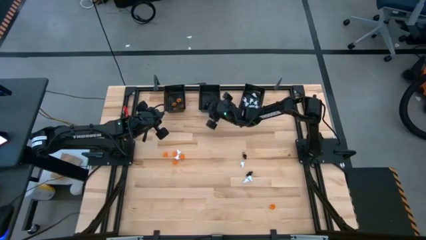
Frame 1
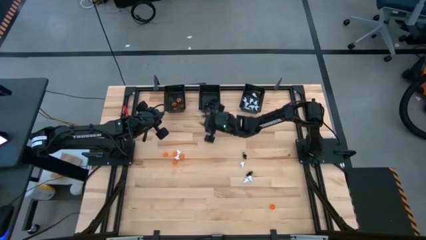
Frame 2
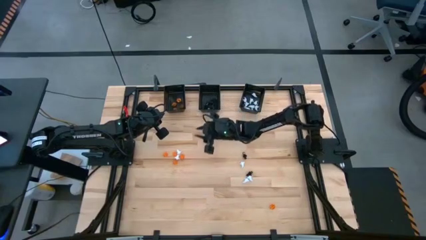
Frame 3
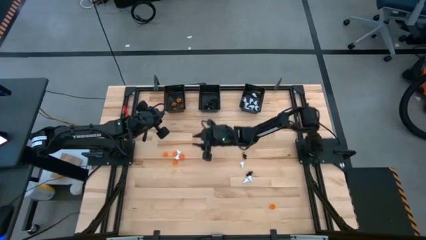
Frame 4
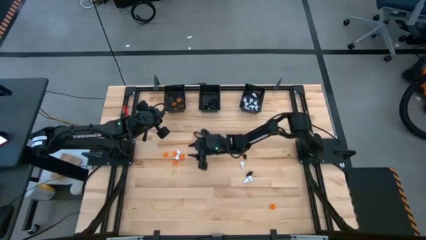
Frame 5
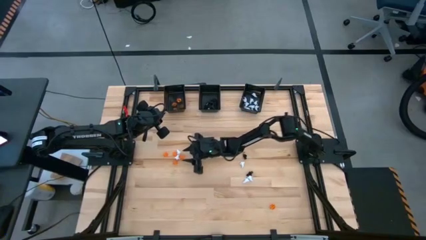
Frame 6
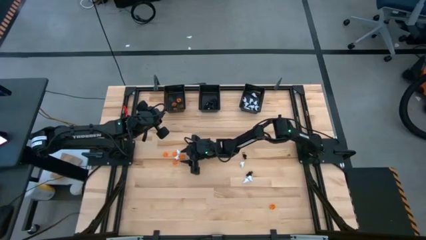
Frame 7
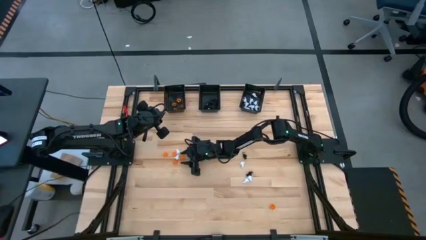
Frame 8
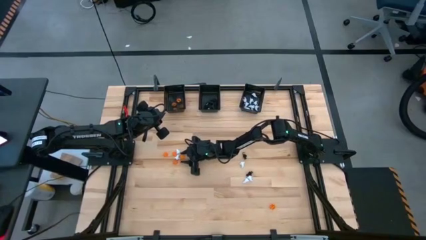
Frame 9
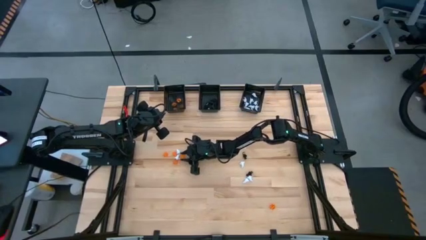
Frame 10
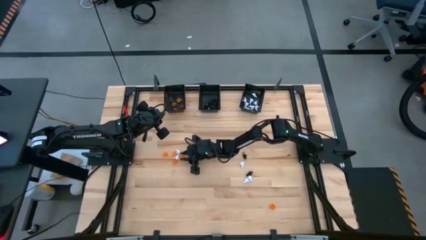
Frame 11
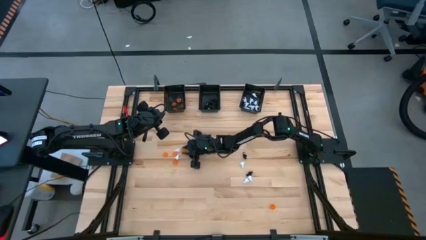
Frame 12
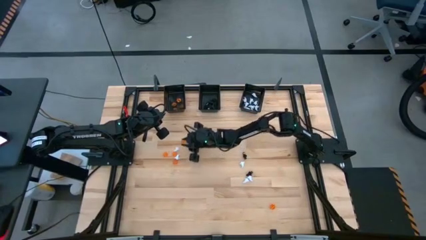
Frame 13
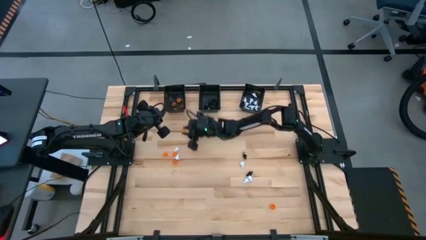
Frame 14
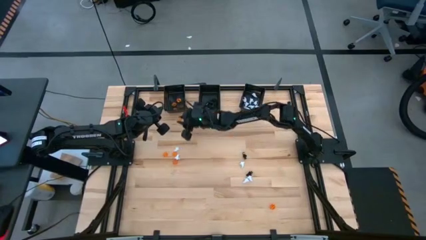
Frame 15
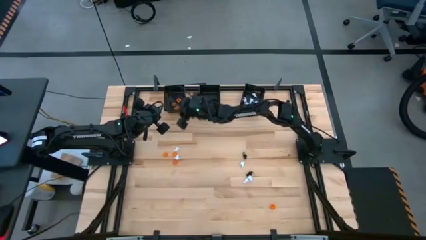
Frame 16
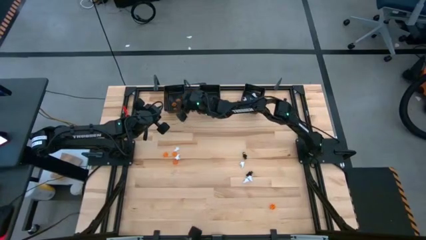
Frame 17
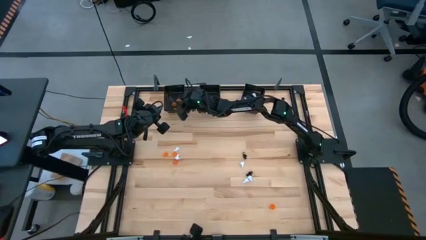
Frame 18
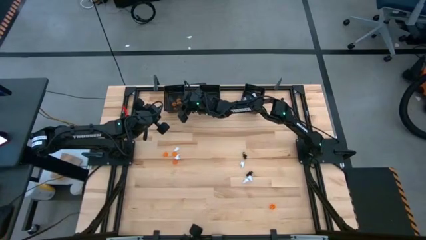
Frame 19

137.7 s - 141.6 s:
Task: Sort Halloween decoration
Put the orange pumpkin toy into the left black basket

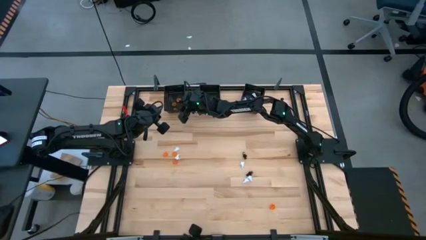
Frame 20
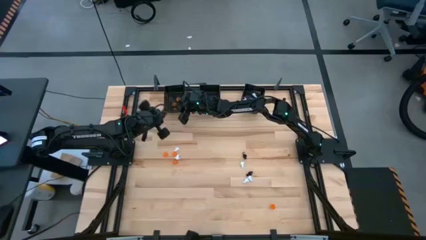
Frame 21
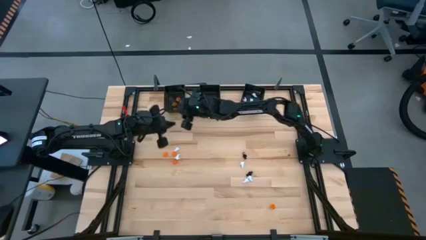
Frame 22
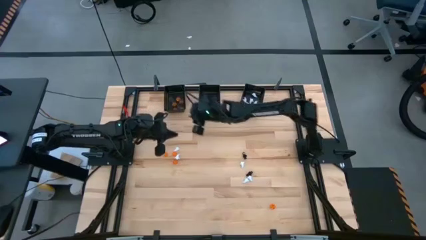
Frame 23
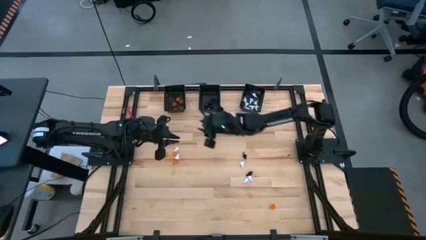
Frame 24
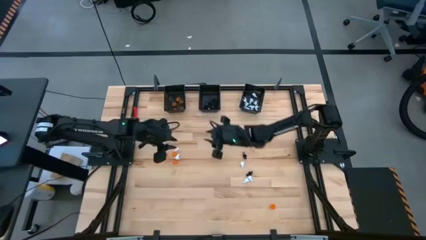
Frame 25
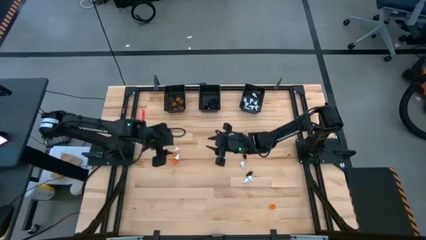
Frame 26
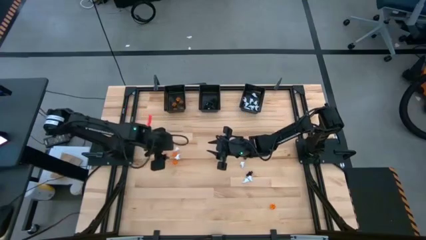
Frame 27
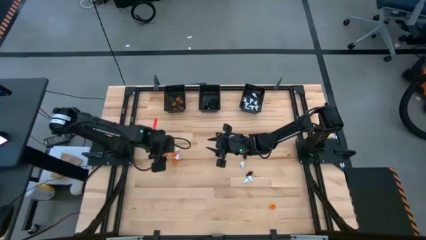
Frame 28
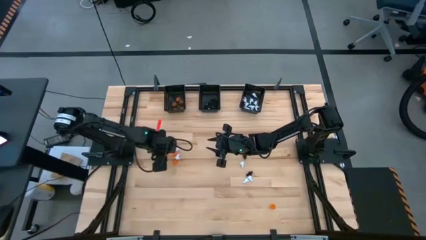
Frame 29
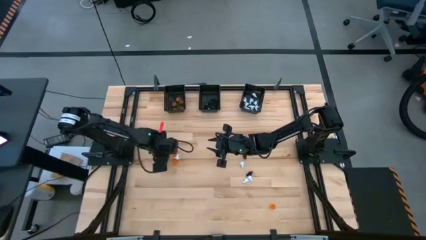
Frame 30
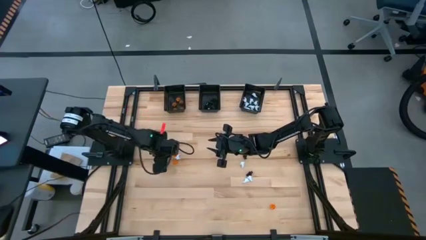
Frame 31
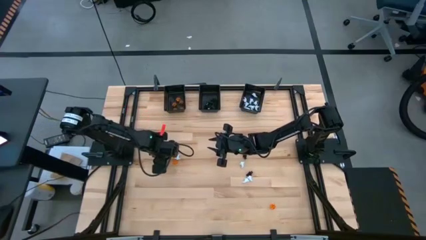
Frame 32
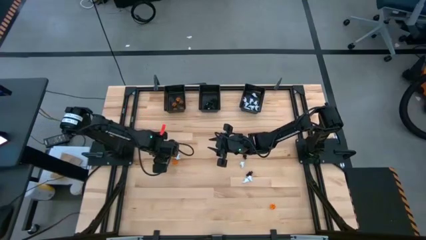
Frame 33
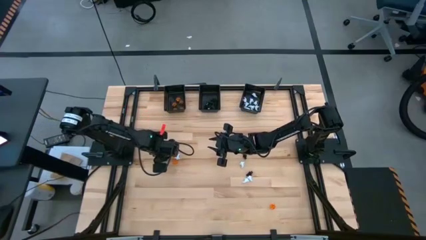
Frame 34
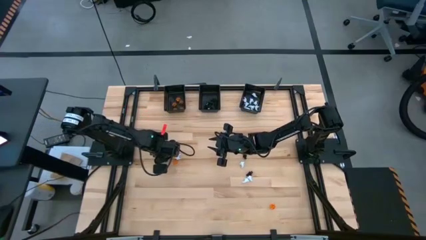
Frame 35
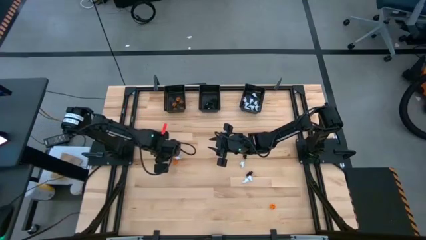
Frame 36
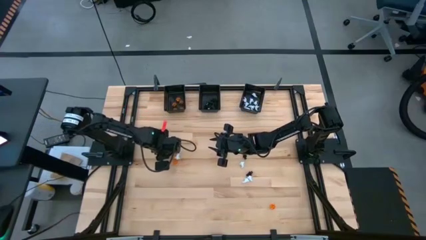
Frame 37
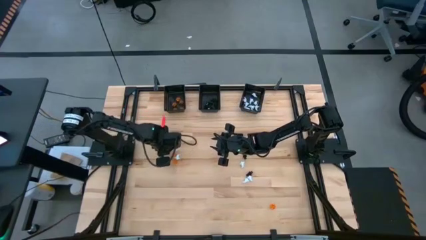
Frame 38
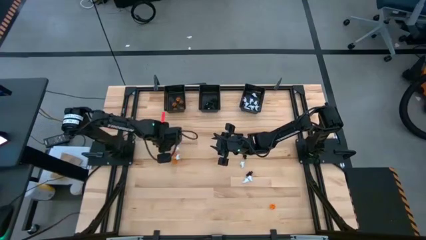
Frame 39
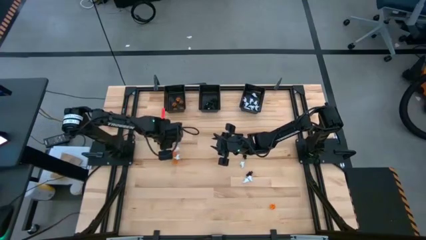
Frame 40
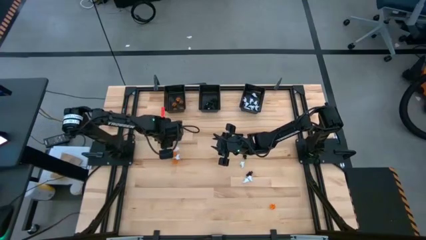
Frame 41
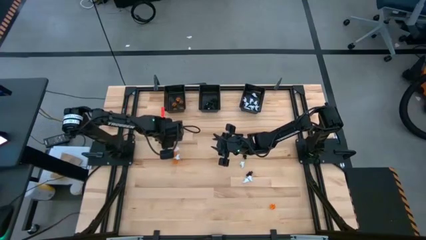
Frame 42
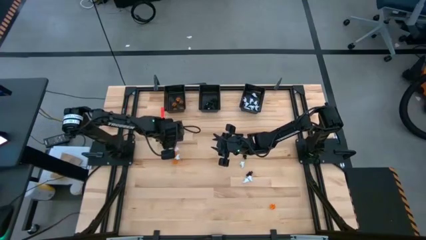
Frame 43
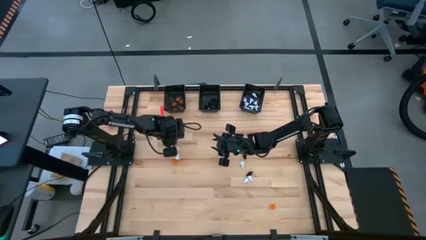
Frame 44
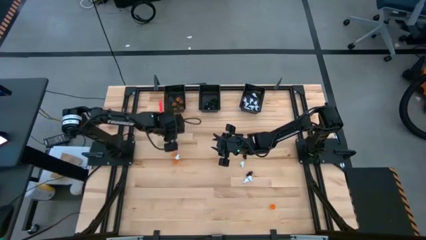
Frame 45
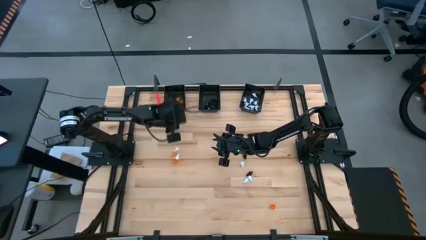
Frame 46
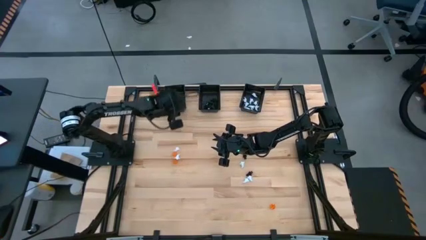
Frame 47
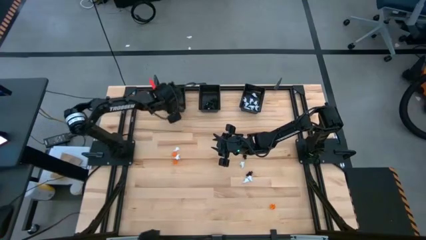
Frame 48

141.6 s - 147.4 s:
Put the orange pumpkin toy into the left black basket

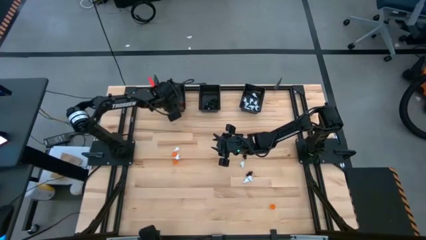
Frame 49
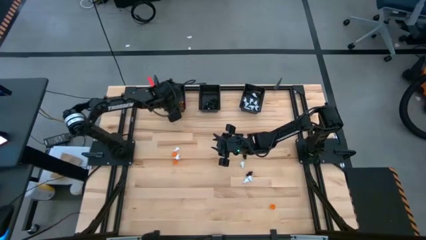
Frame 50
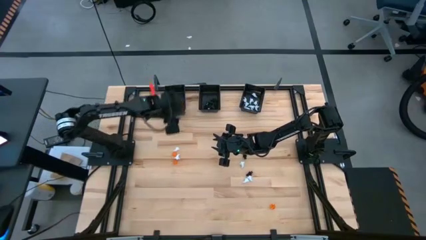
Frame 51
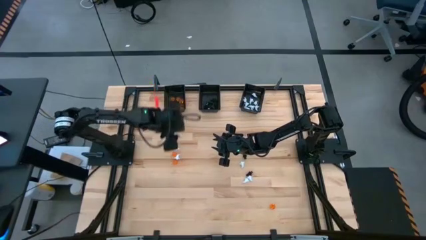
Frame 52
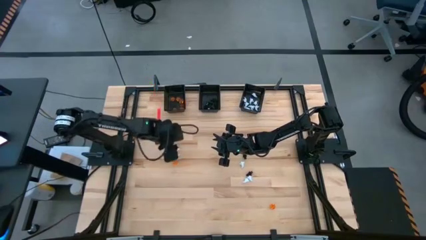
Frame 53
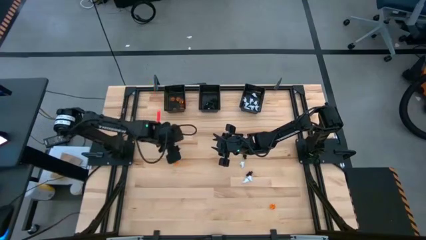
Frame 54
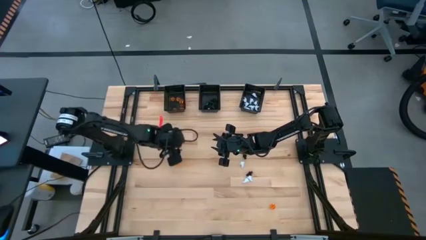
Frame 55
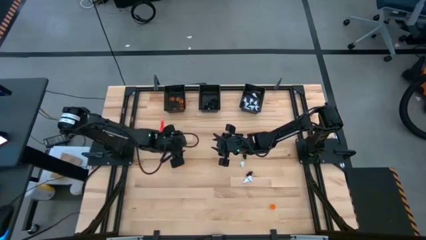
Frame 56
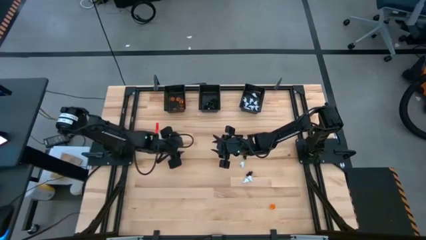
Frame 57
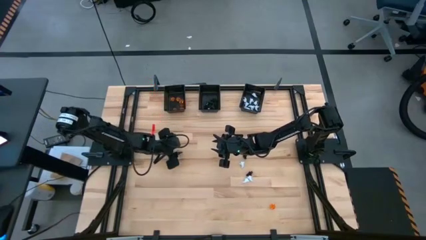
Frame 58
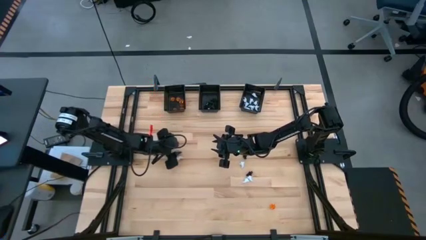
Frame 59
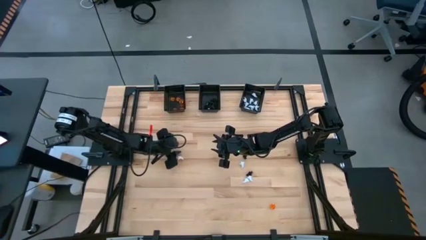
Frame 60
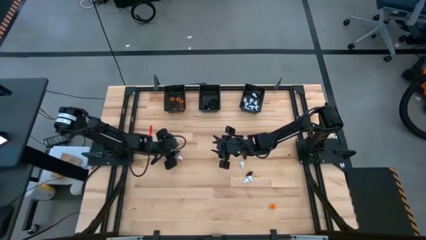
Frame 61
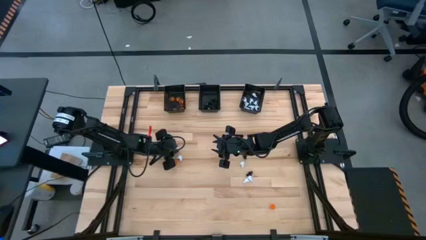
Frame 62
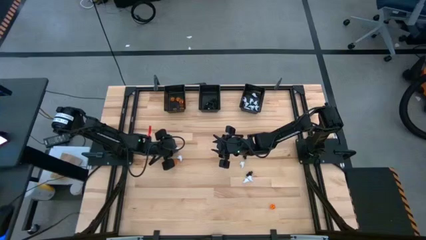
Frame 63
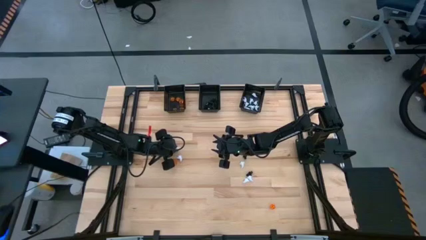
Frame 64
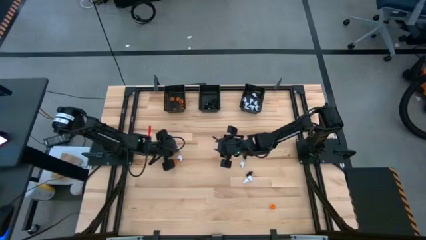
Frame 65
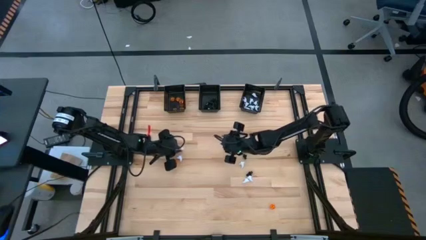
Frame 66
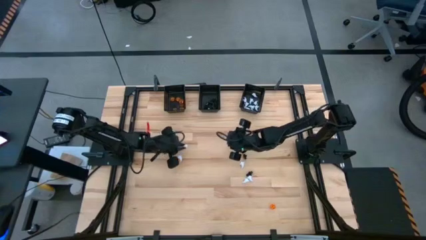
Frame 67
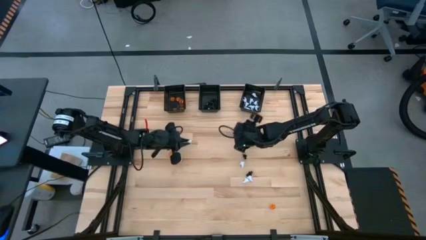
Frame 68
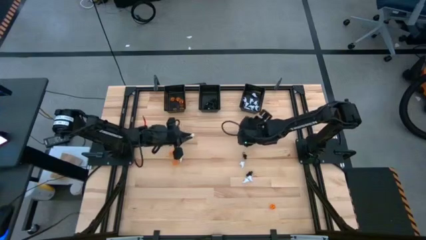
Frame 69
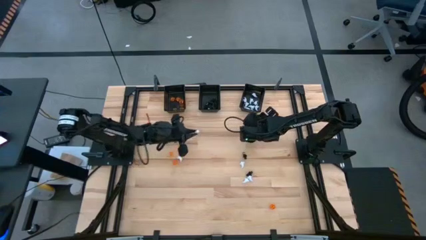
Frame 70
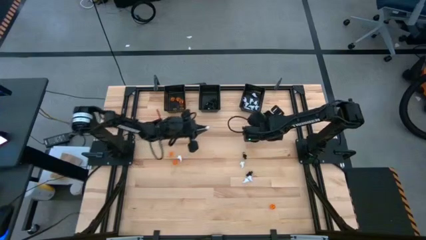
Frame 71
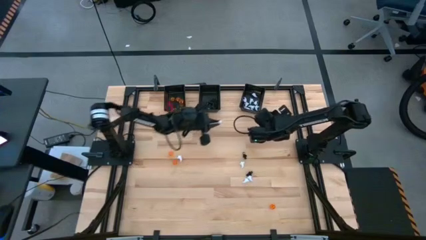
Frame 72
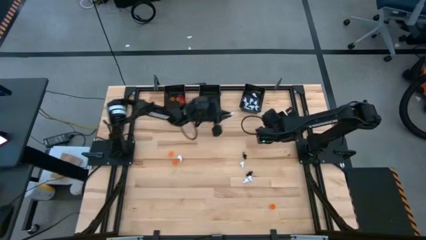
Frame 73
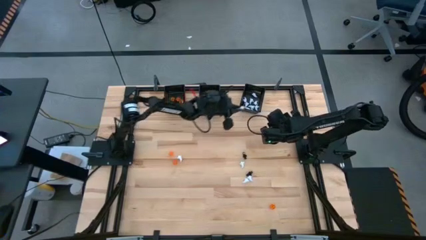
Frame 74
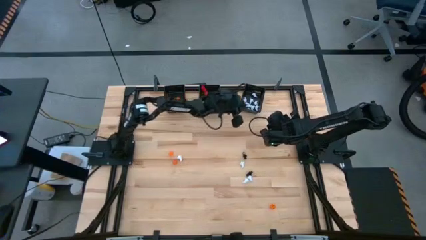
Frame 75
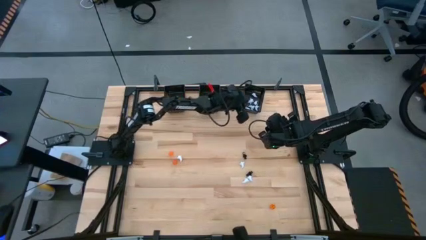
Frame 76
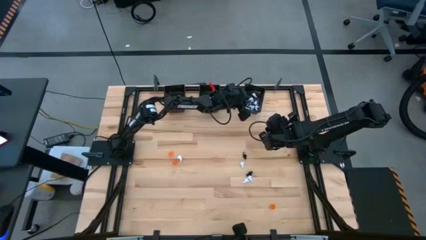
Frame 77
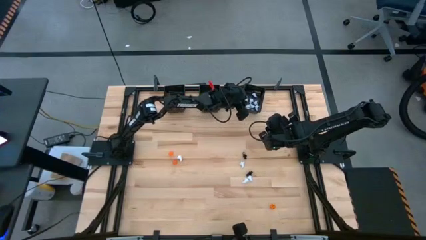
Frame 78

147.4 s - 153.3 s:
Put the white ghost toy into the right black basket

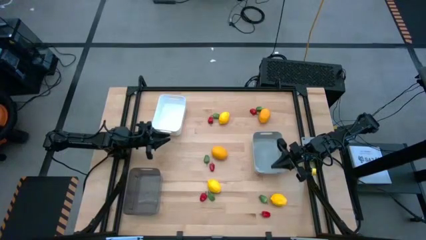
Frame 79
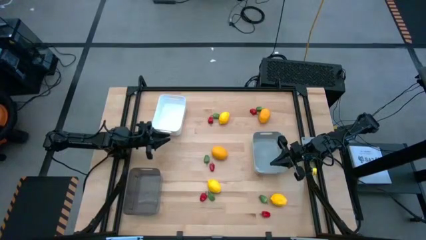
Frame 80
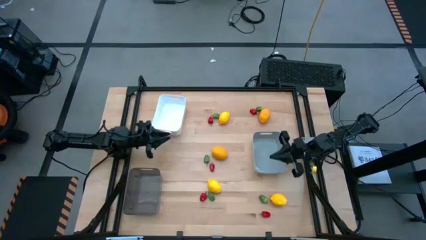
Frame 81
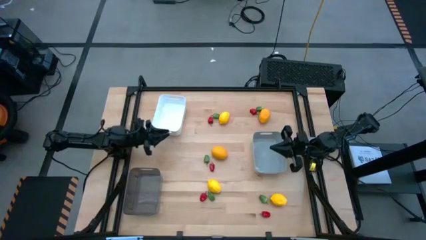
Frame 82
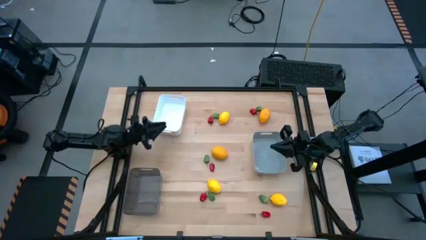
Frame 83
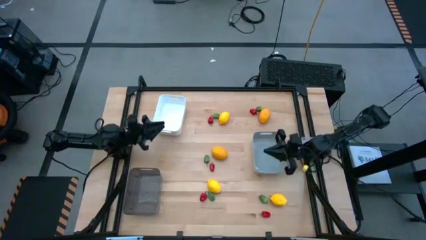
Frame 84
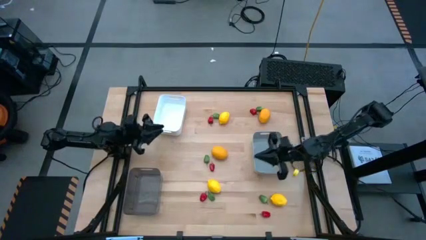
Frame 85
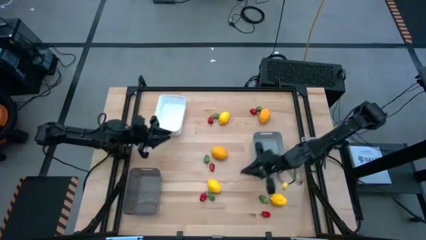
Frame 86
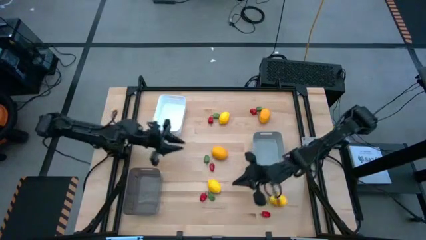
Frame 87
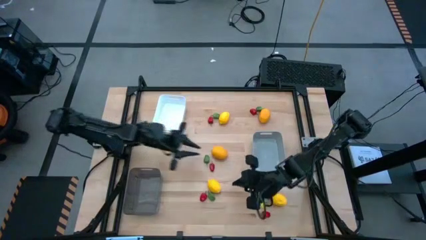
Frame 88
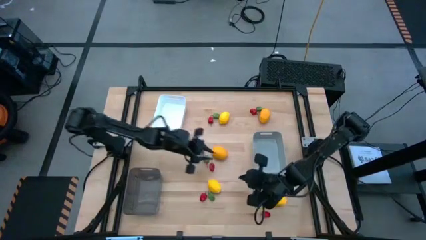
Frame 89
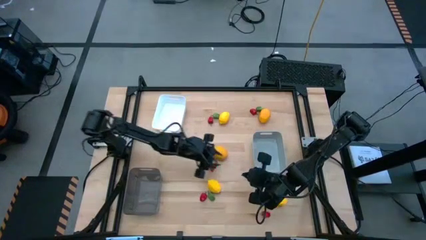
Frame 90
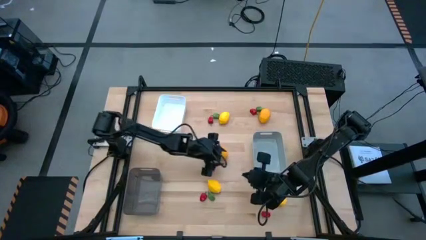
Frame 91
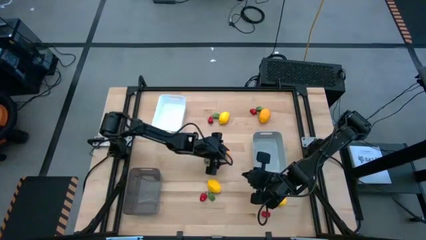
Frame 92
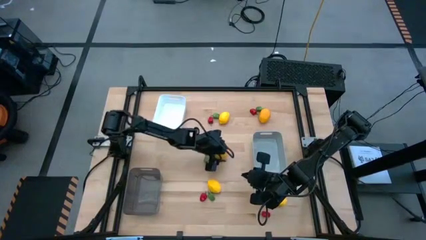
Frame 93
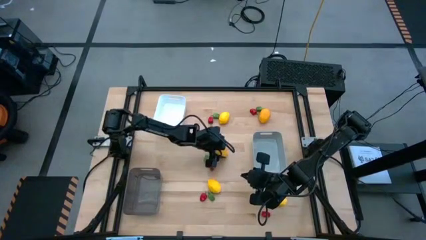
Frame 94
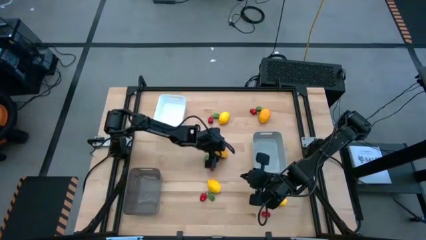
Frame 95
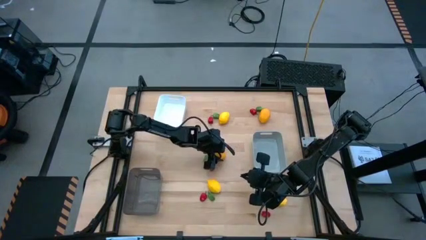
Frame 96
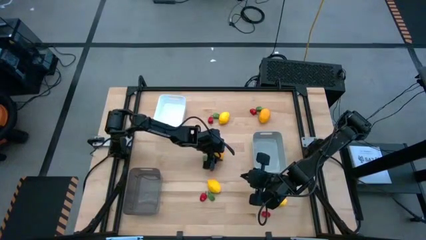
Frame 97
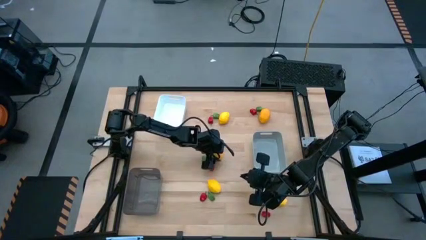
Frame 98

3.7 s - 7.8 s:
Task: Sort produce into baskets
Put the middle left yellow lemon into the white bin
